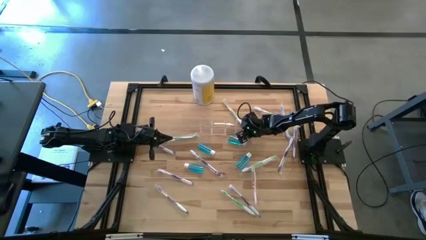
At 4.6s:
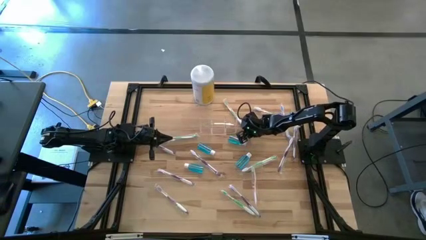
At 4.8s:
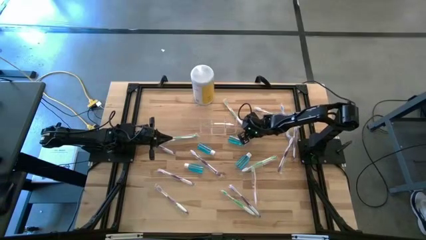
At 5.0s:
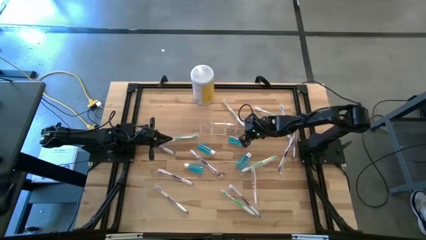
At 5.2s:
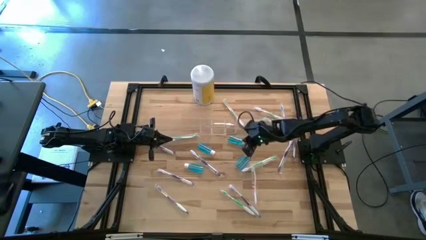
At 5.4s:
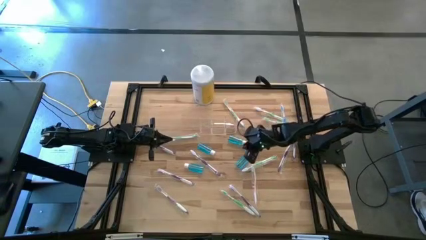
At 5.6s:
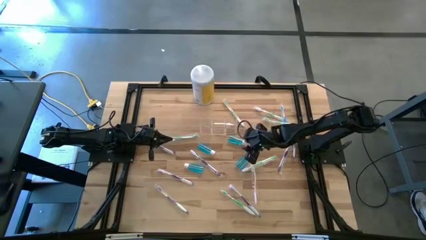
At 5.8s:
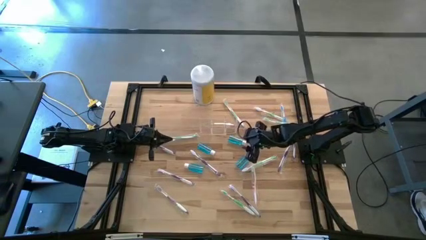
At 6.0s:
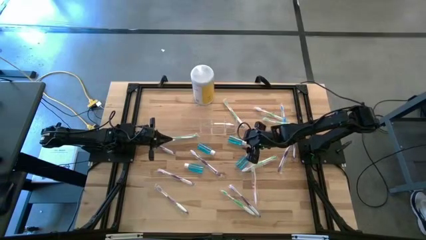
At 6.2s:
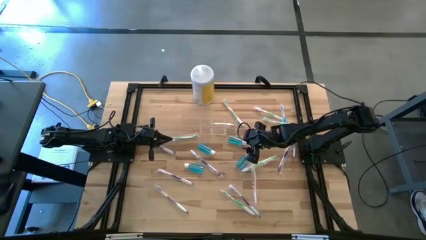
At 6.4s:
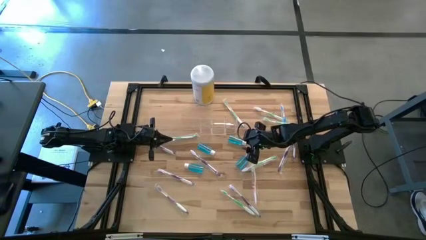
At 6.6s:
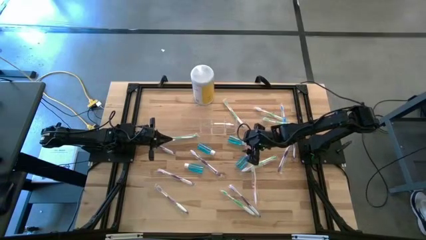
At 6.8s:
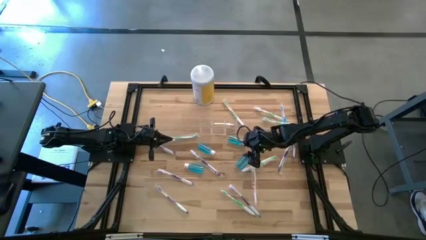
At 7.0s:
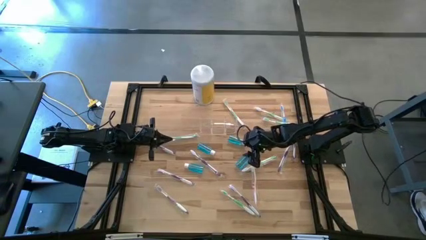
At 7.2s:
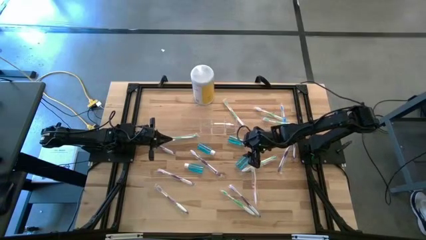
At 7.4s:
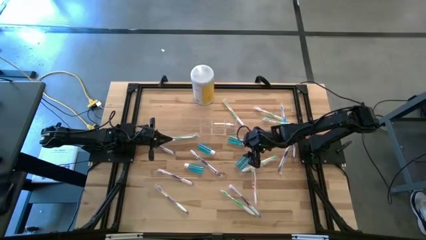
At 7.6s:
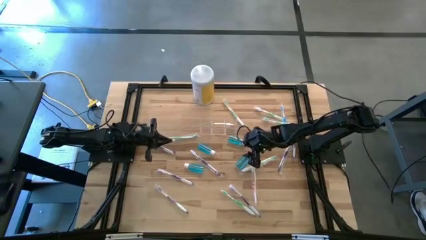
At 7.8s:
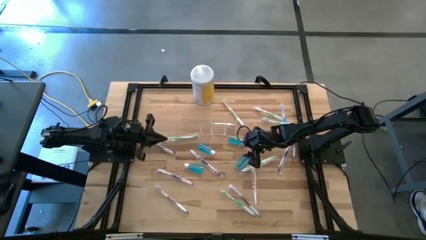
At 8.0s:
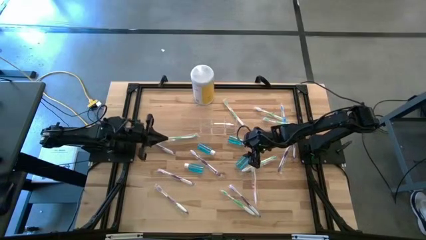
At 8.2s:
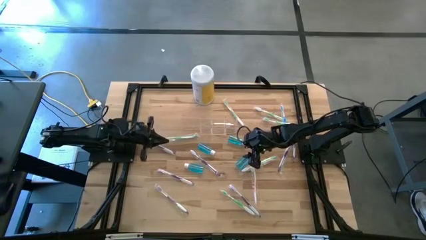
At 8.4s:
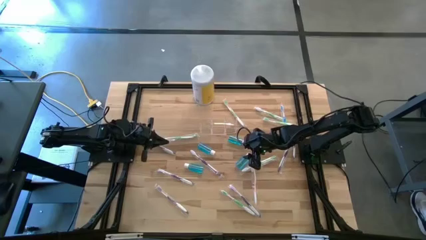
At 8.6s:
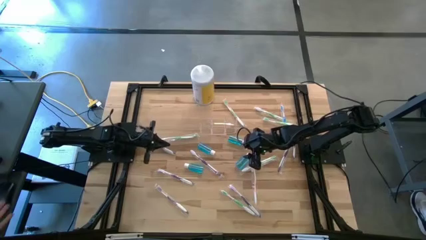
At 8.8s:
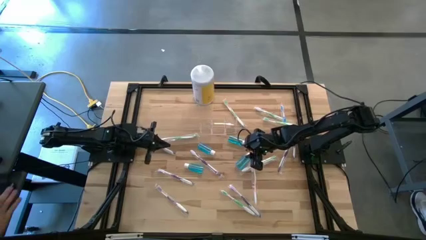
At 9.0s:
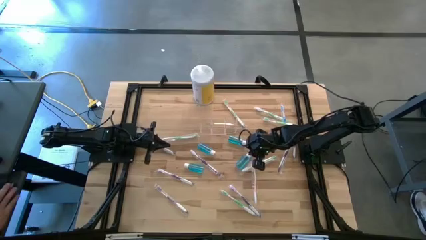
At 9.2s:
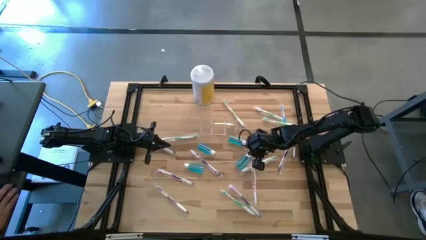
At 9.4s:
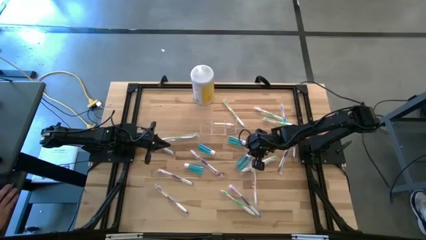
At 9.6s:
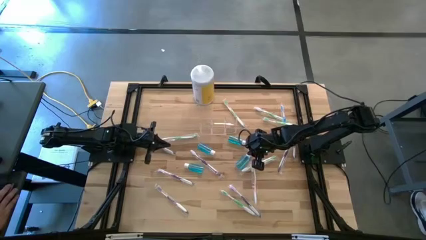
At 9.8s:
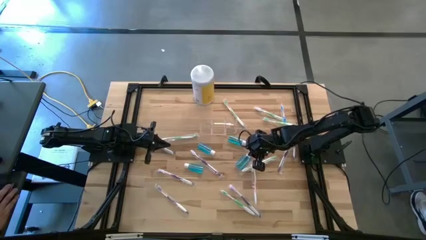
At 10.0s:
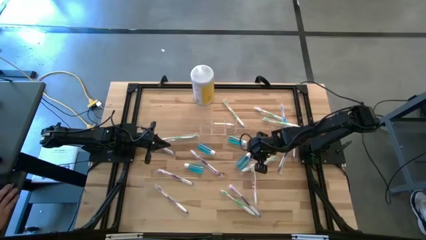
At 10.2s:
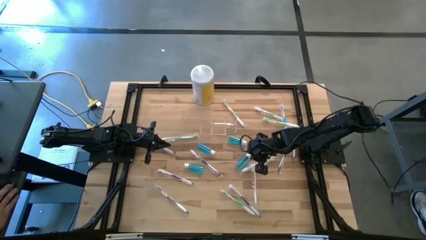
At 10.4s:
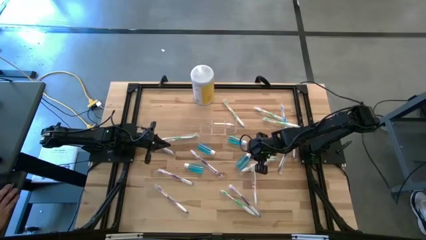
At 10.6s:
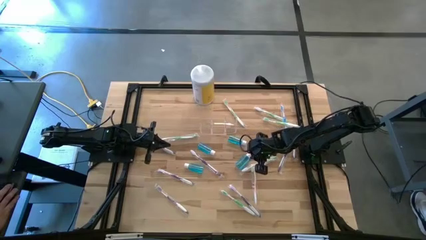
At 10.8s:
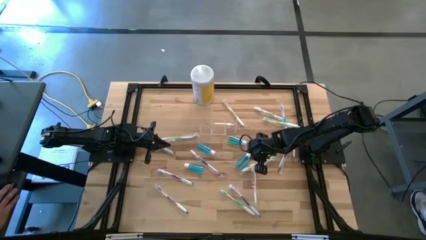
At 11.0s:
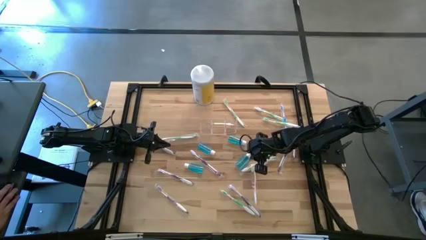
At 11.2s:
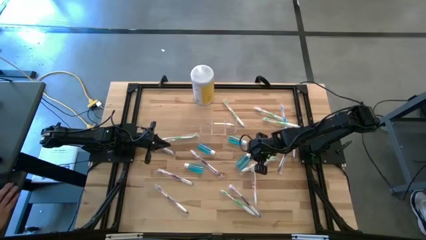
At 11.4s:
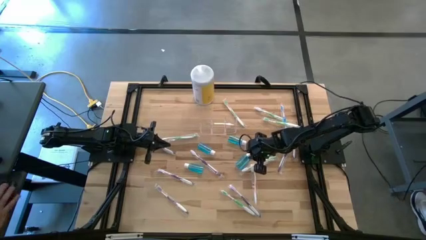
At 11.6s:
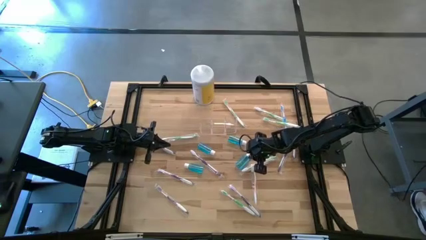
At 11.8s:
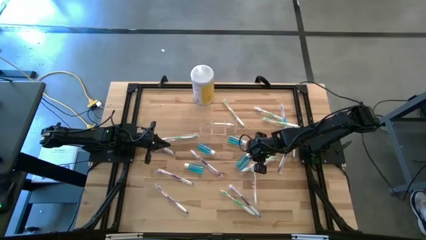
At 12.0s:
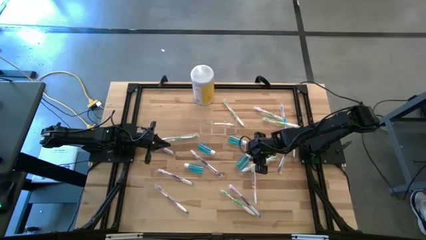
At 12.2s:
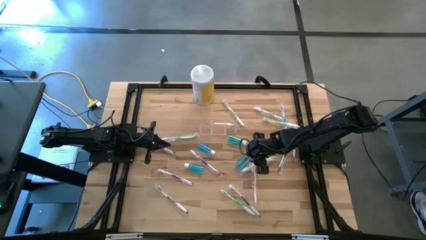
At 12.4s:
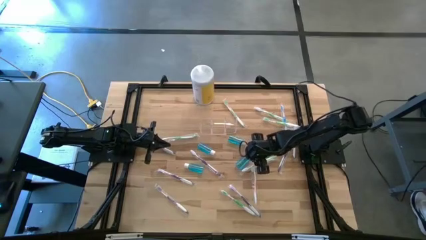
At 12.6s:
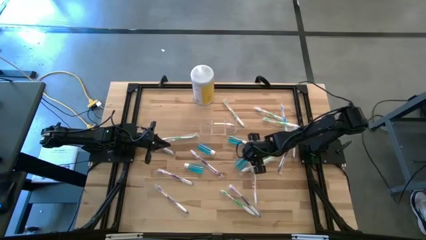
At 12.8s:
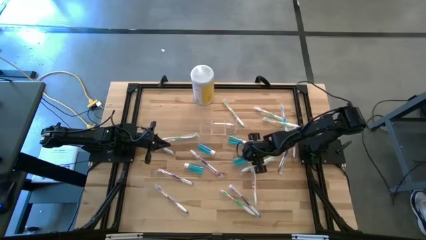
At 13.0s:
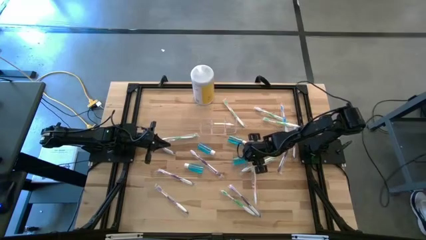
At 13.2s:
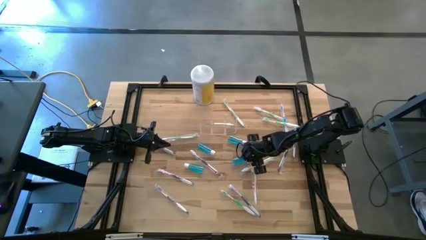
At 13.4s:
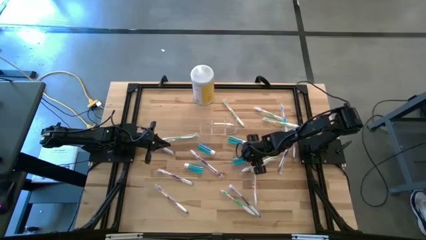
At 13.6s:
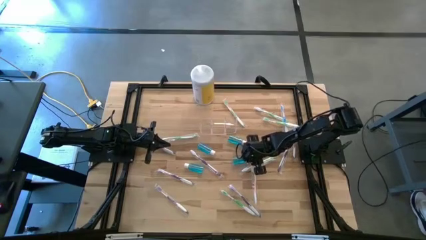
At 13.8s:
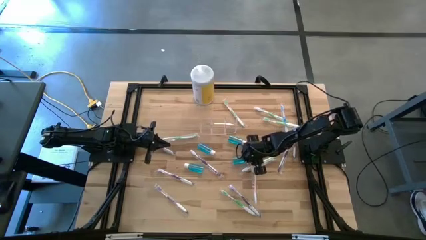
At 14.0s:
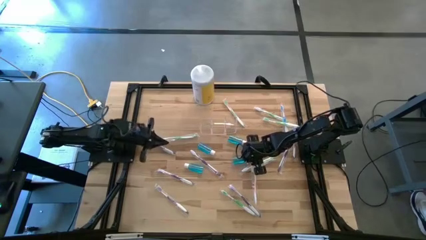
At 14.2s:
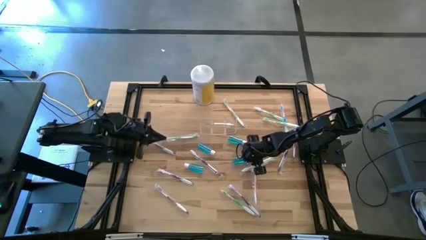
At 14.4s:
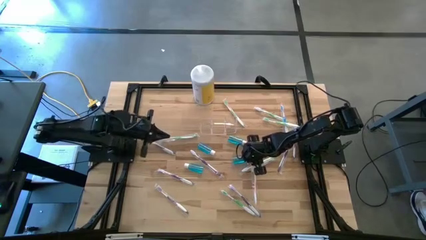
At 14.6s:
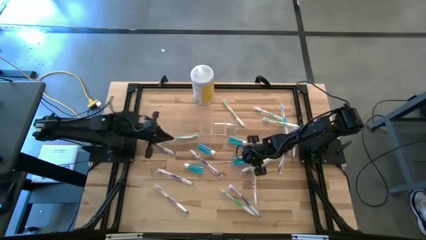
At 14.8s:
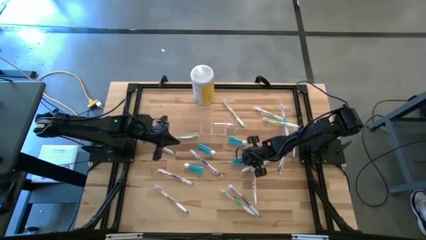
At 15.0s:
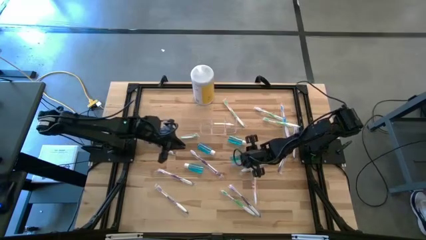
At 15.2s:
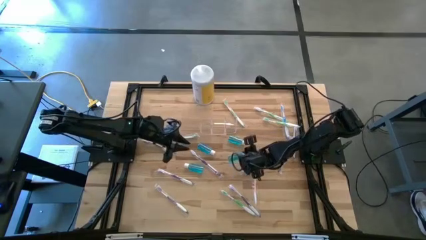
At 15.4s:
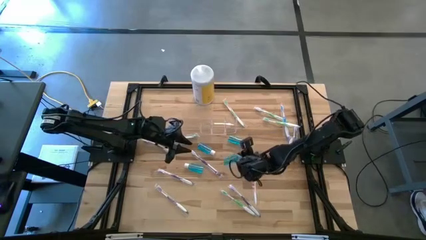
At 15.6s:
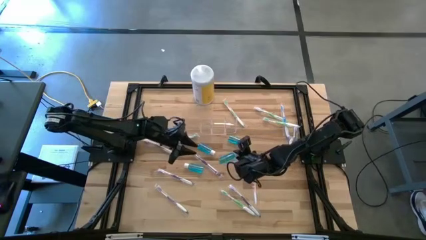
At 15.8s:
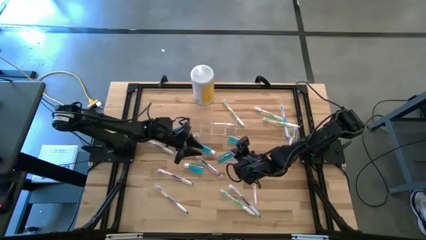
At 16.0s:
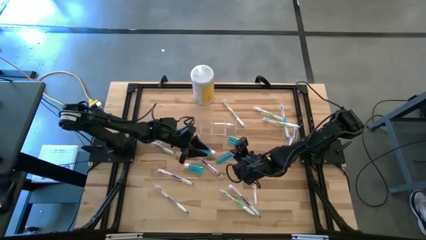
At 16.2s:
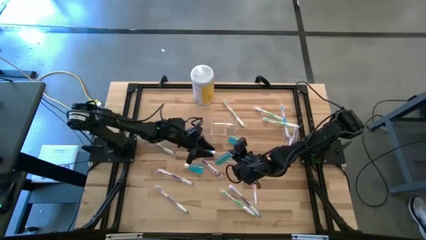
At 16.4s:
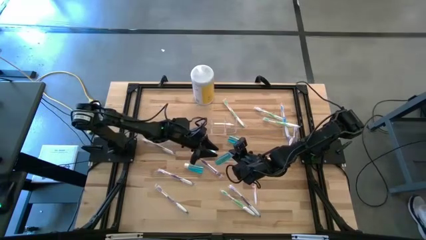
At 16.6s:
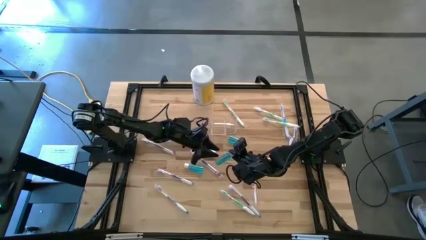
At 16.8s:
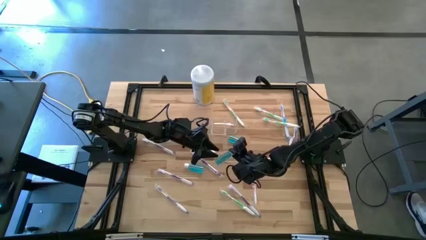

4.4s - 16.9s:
Task: Pick & Place toothbrushing station
Put the mouthwash into the transparent organizer
